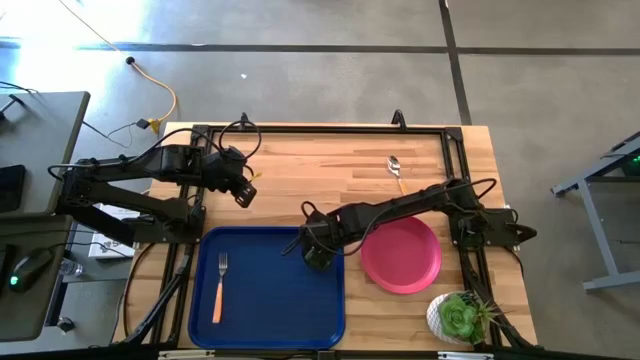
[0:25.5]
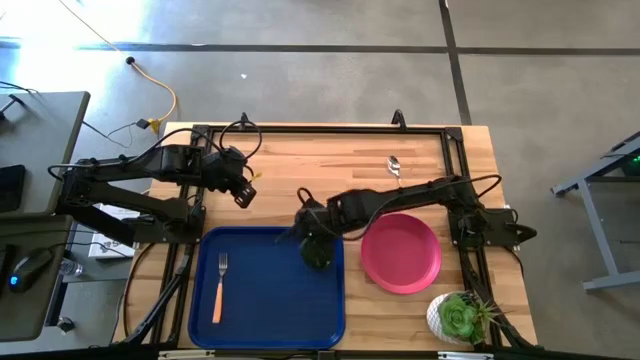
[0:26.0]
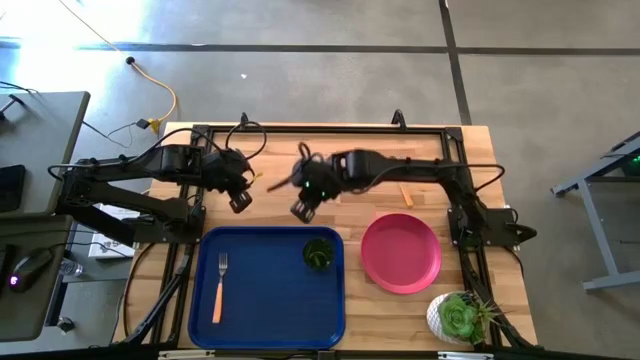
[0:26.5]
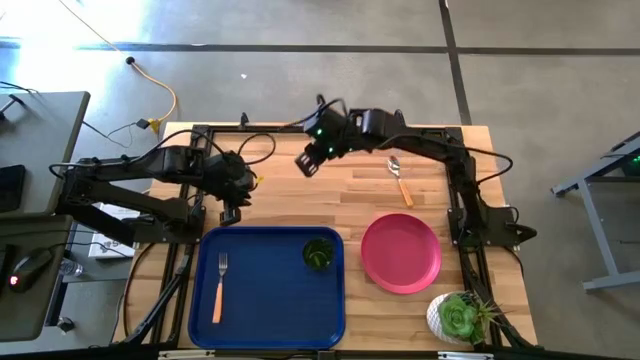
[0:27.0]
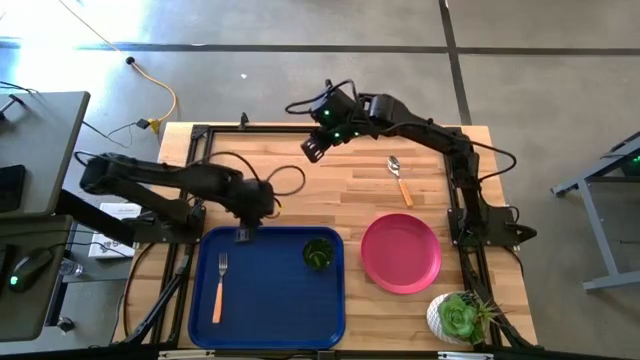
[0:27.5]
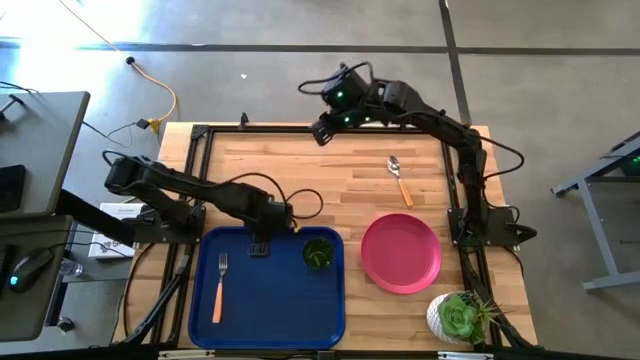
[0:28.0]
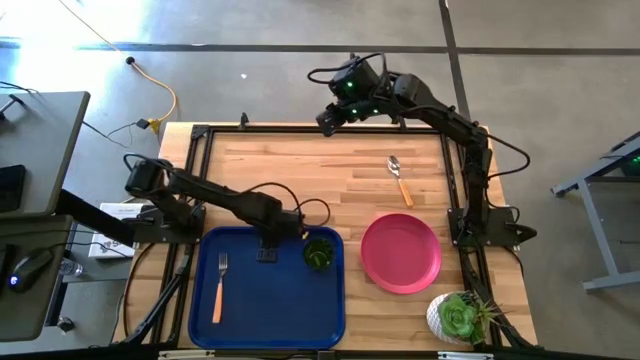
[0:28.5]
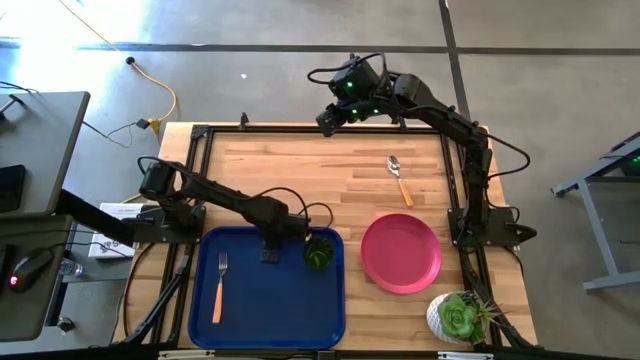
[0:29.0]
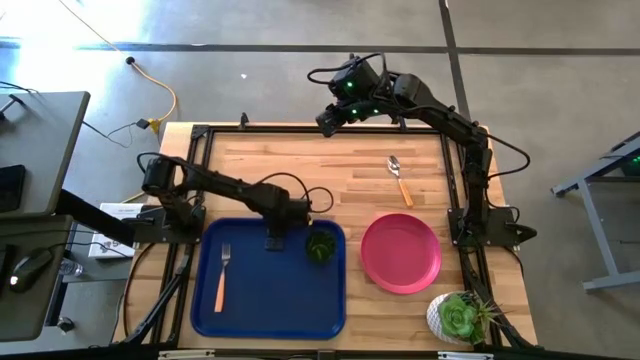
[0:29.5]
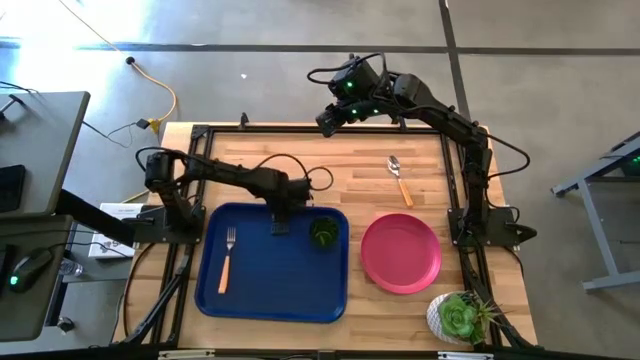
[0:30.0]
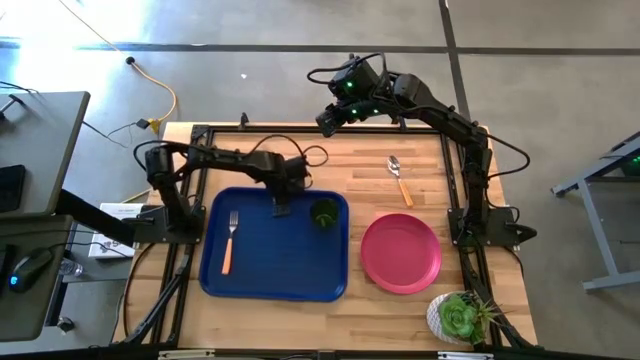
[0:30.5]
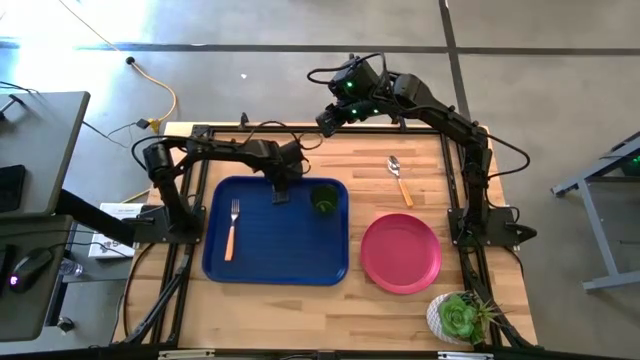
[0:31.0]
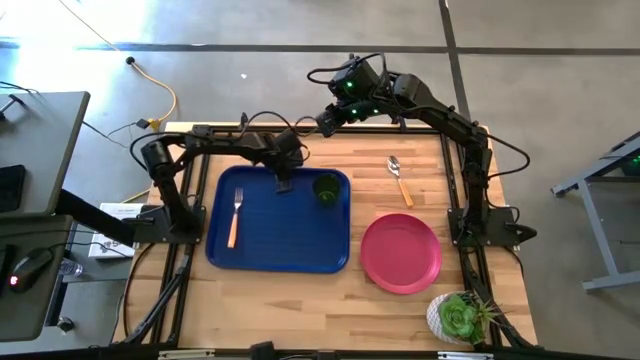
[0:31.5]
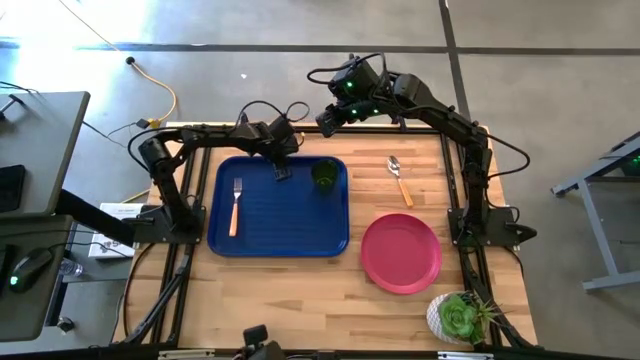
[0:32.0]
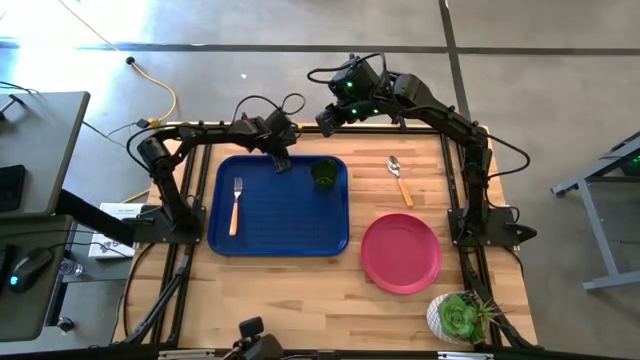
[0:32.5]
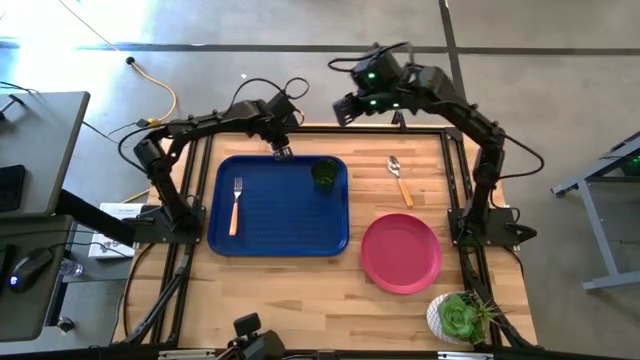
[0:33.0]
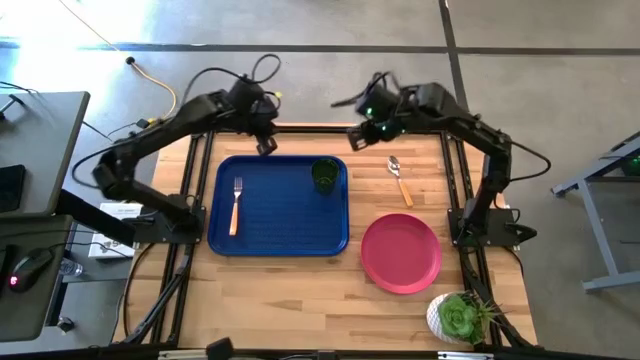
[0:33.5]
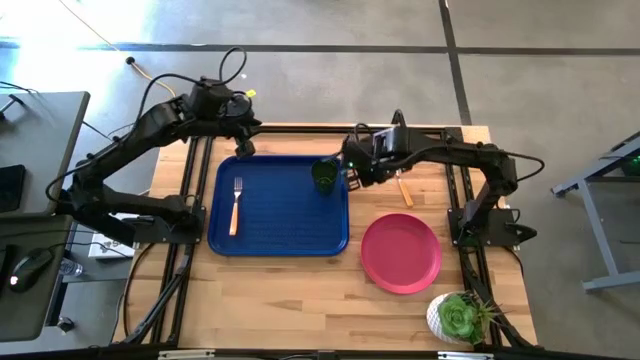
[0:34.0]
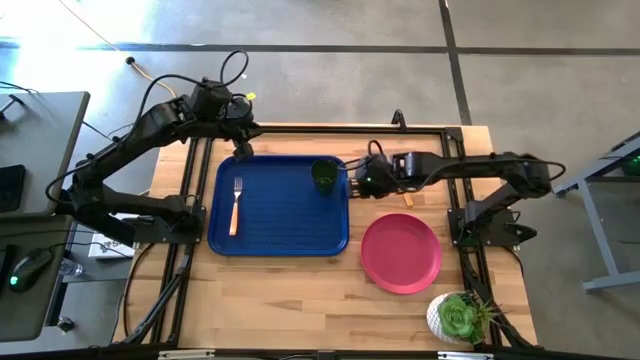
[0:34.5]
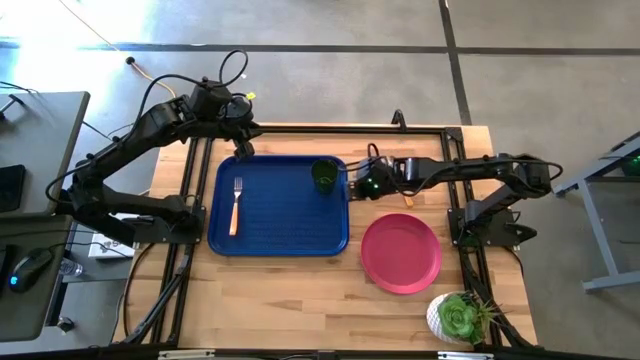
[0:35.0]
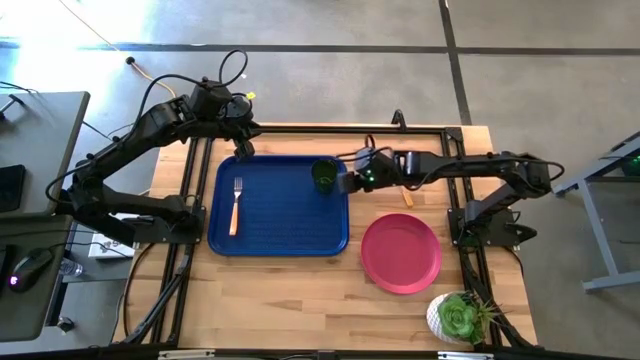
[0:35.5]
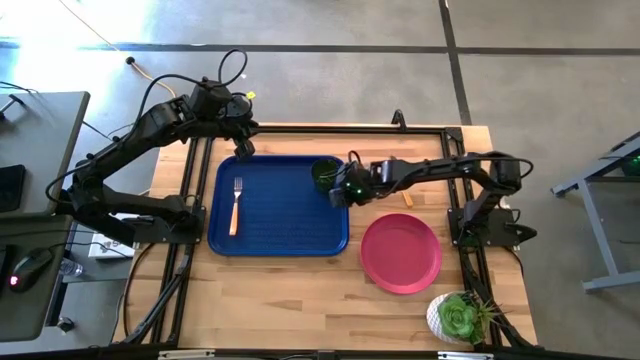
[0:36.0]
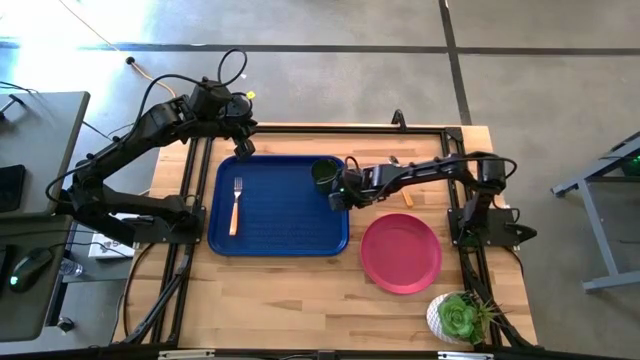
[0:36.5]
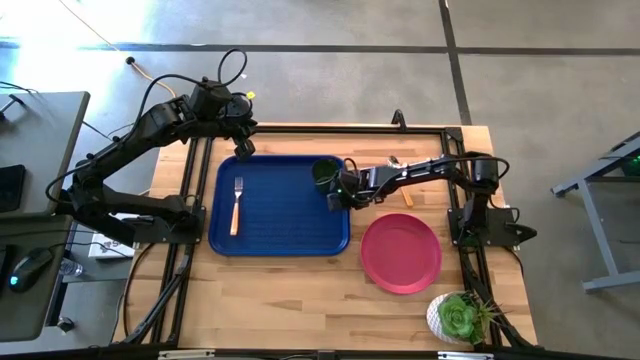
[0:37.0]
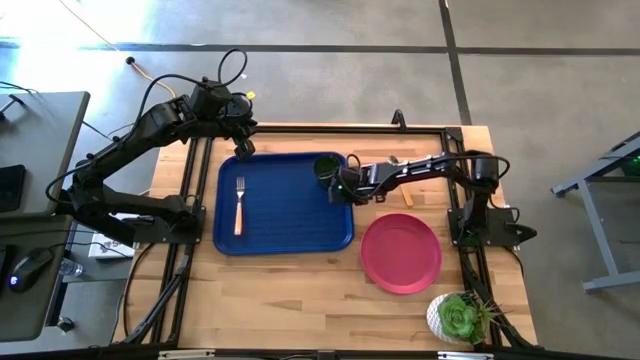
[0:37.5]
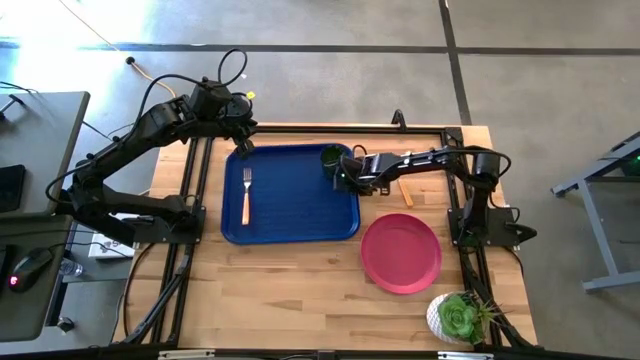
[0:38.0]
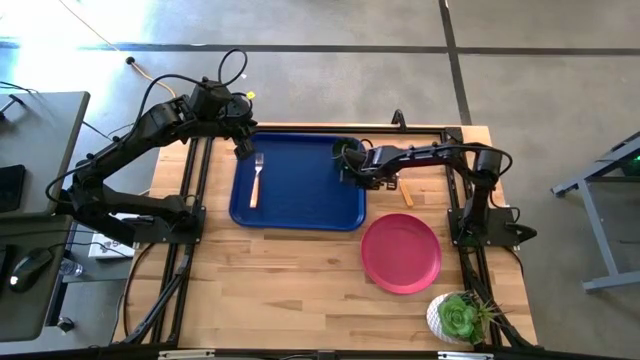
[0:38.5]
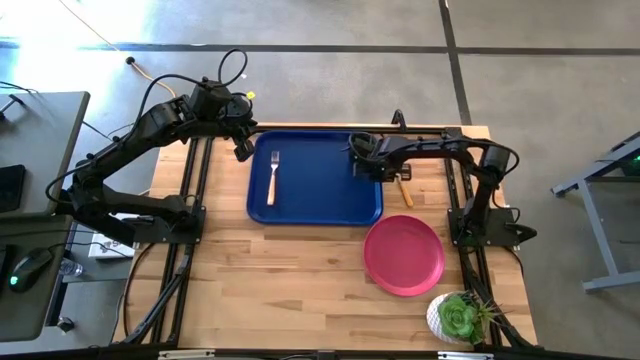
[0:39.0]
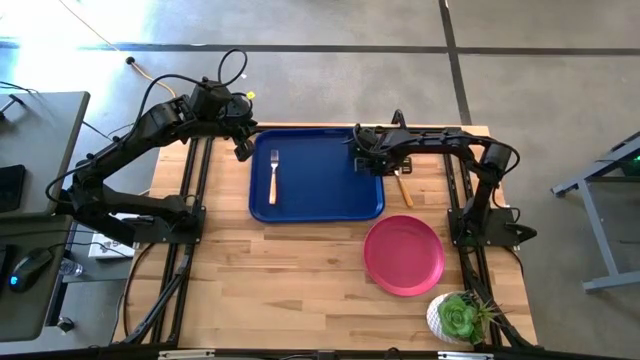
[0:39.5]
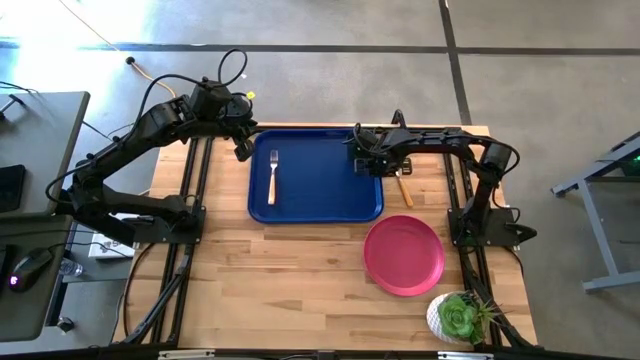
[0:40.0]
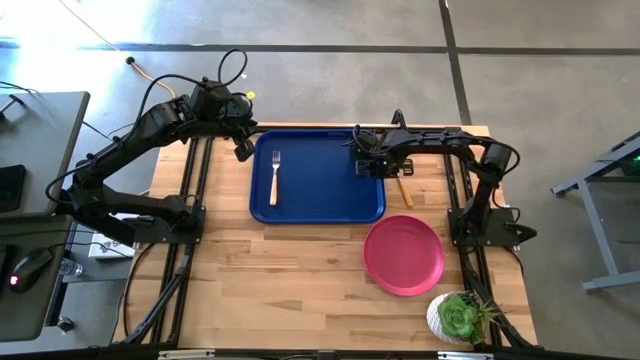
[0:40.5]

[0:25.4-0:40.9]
Task: Pick and place plate/cup/fork/spoon on tray
Move the blue tray to the top of the table

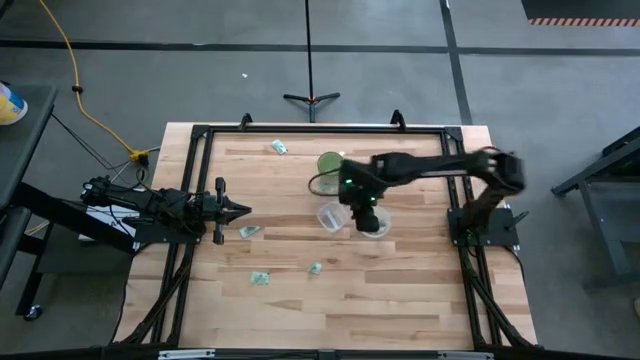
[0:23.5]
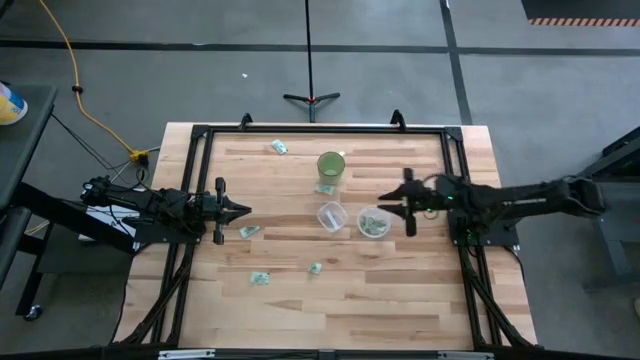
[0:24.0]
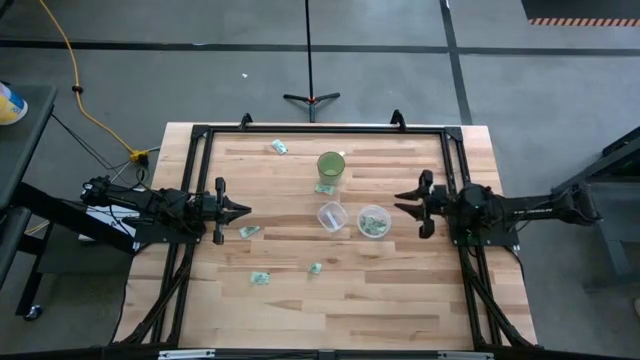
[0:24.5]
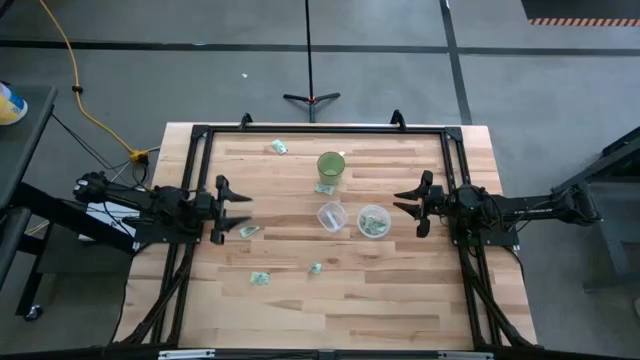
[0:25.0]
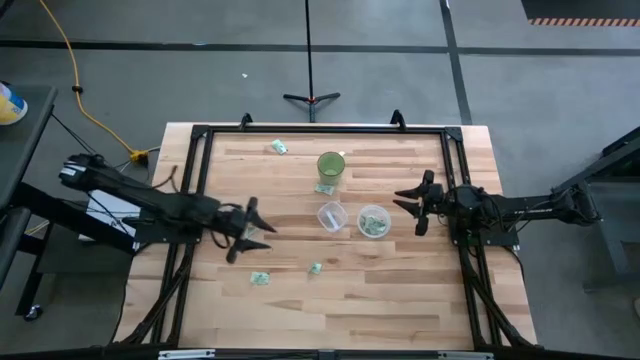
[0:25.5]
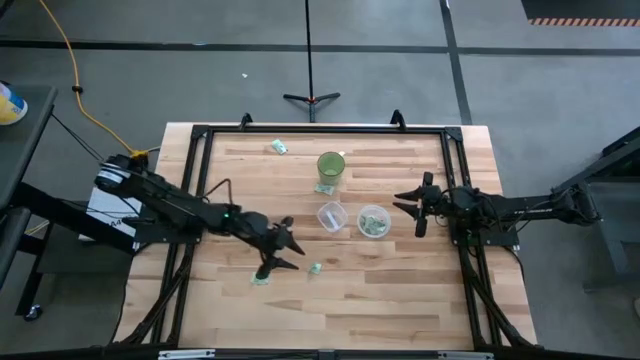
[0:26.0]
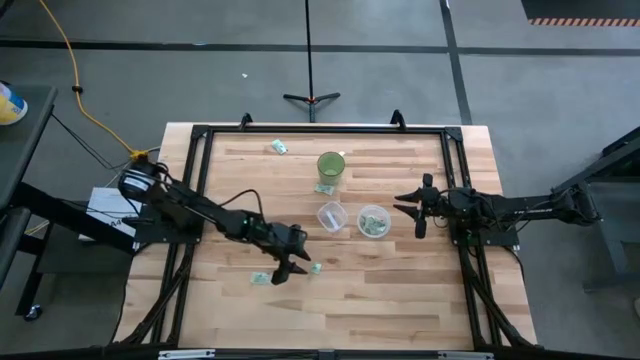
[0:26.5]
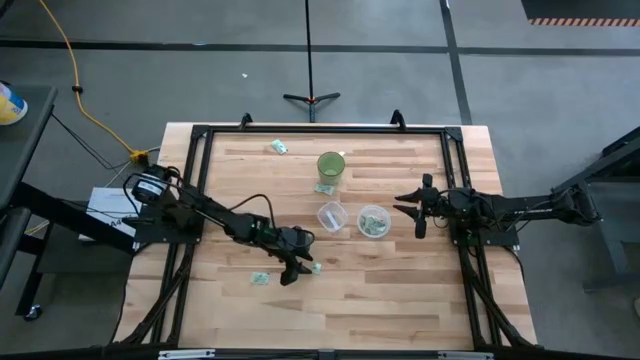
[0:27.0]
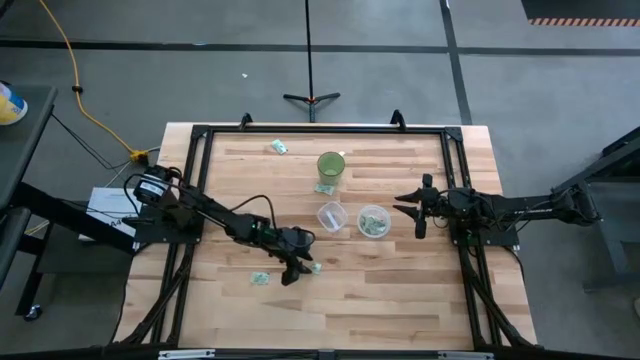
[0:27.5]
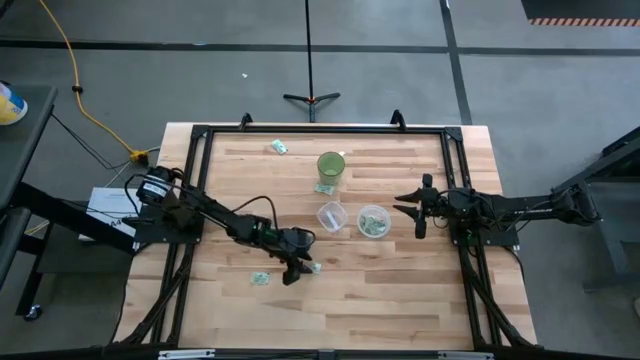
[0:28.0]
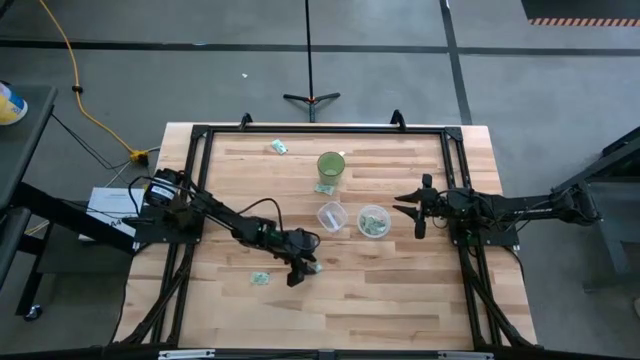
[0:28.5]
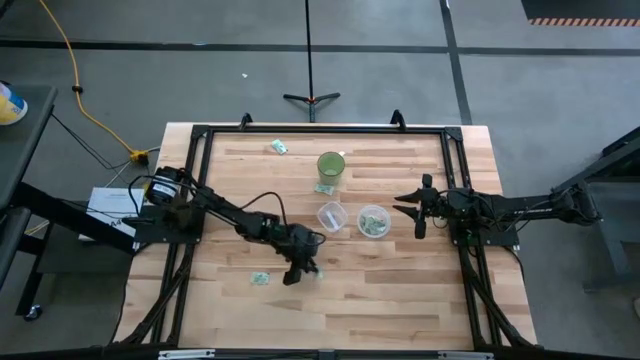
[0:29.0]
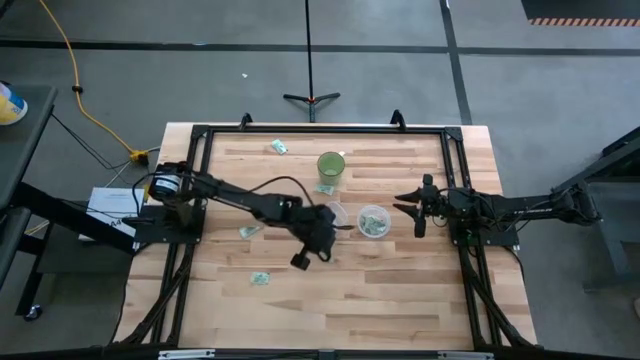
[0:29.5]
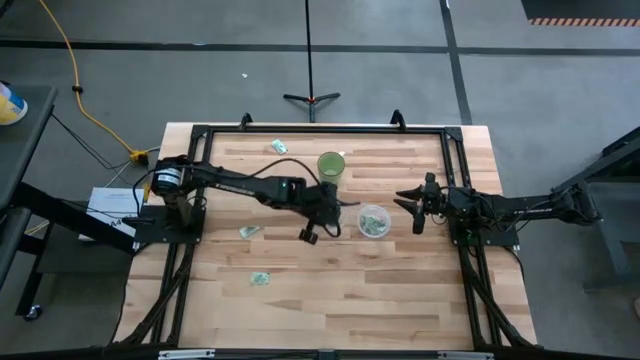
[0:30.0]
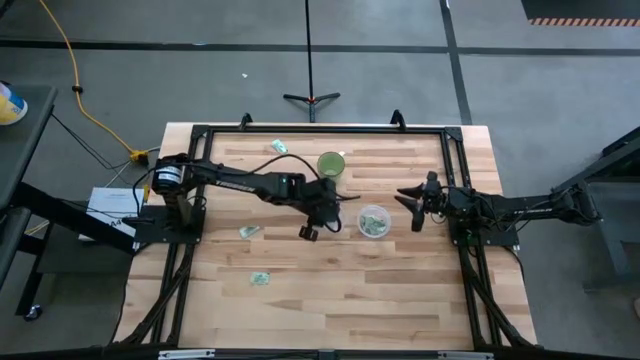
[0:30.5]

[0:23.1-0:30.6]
Task: Pick and place items into bin
Put the stevia packet into the left transparent bin
